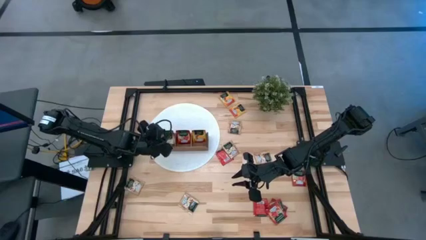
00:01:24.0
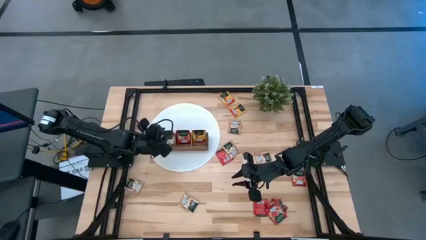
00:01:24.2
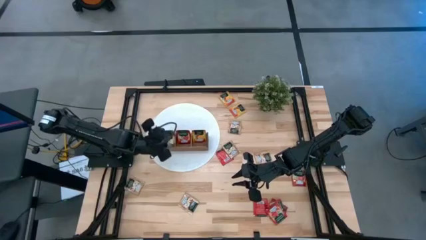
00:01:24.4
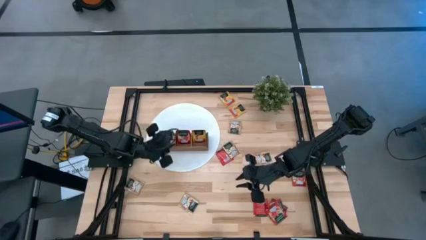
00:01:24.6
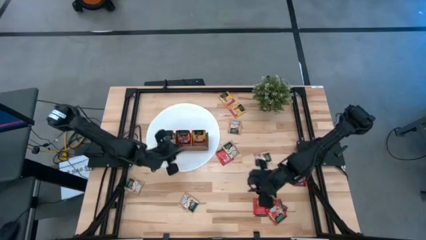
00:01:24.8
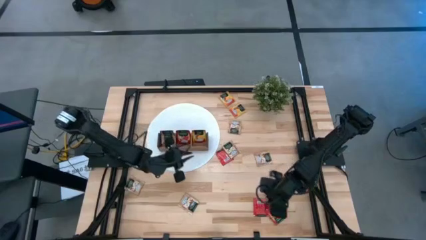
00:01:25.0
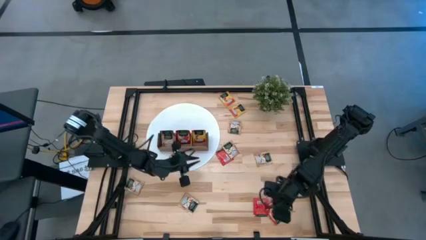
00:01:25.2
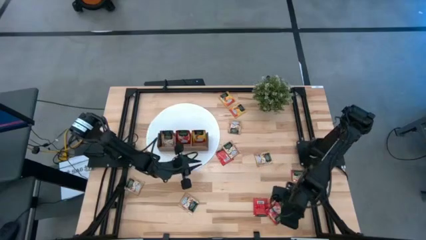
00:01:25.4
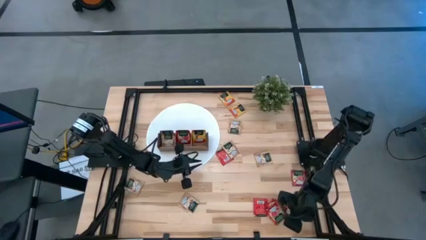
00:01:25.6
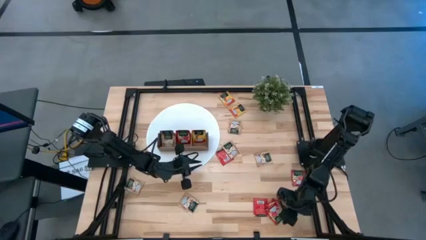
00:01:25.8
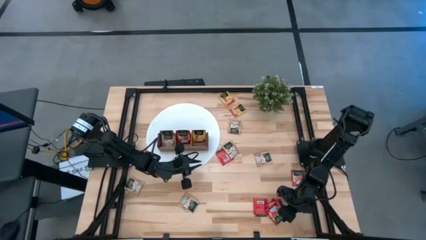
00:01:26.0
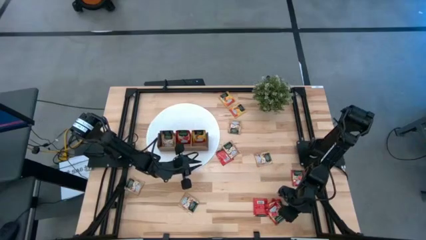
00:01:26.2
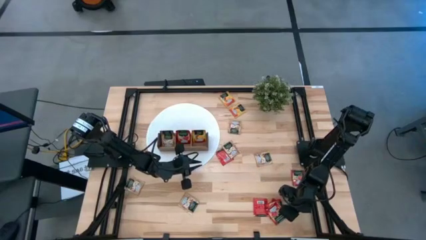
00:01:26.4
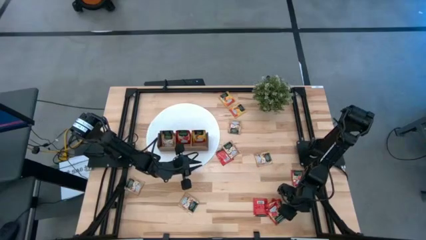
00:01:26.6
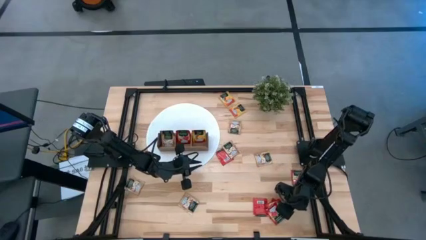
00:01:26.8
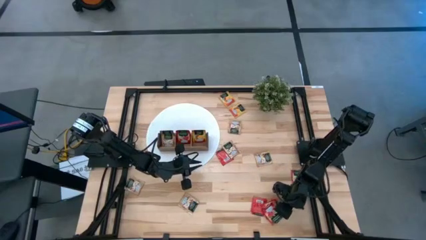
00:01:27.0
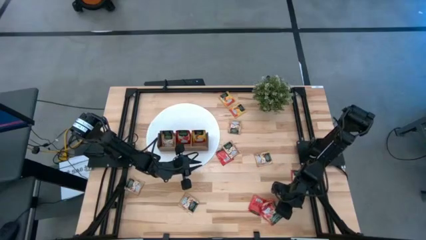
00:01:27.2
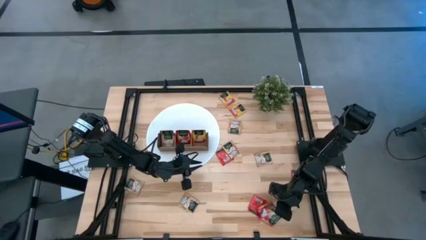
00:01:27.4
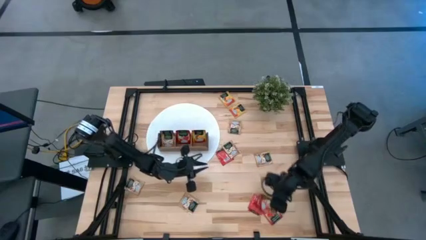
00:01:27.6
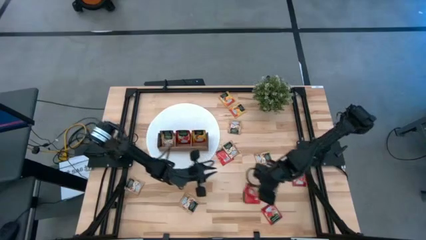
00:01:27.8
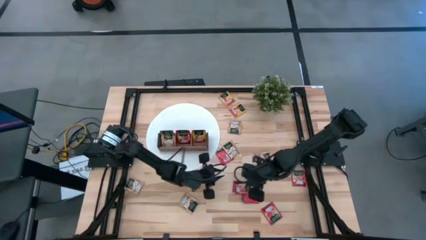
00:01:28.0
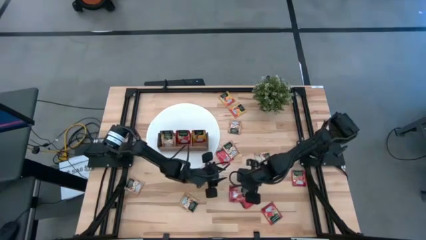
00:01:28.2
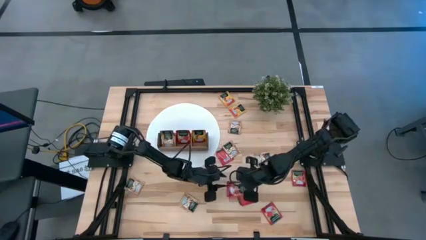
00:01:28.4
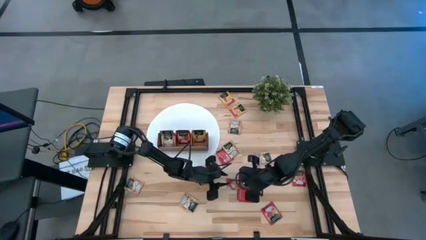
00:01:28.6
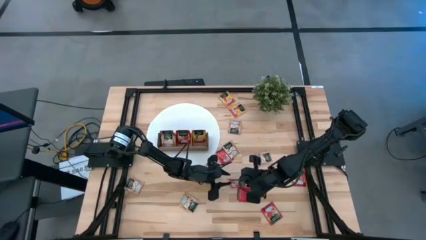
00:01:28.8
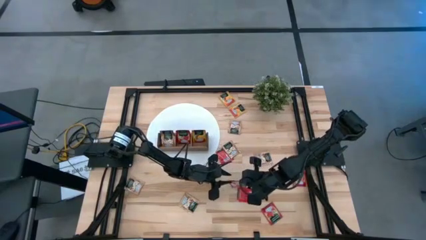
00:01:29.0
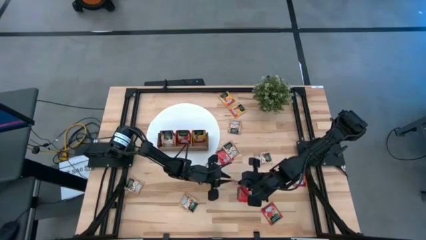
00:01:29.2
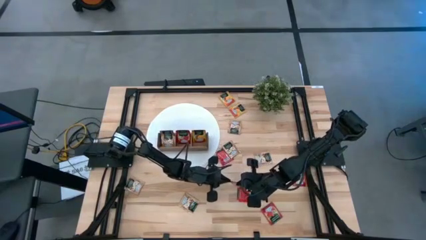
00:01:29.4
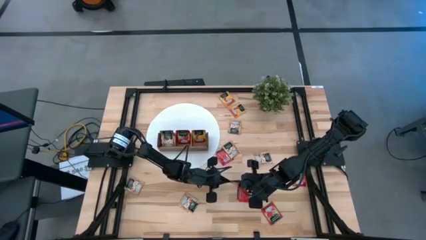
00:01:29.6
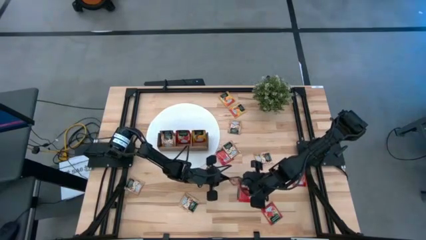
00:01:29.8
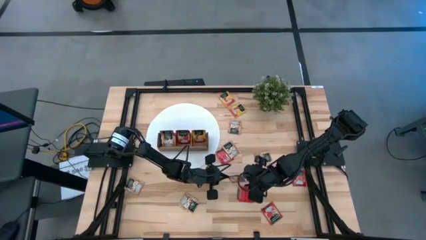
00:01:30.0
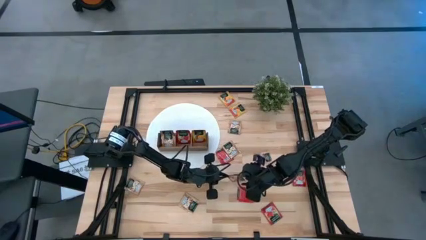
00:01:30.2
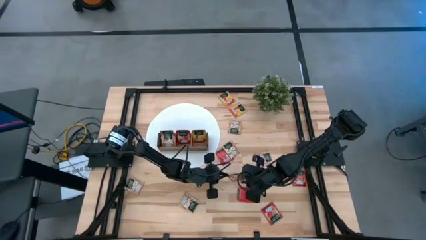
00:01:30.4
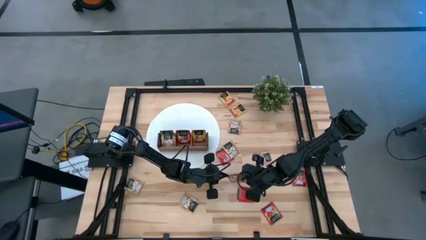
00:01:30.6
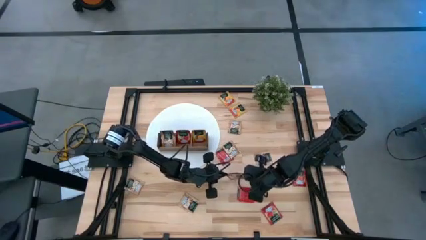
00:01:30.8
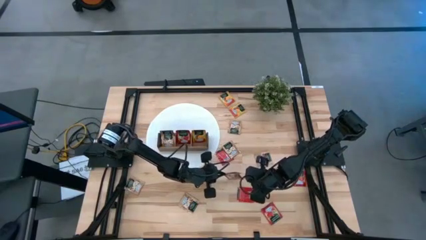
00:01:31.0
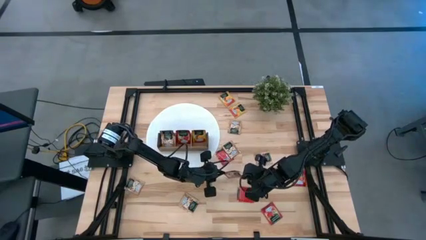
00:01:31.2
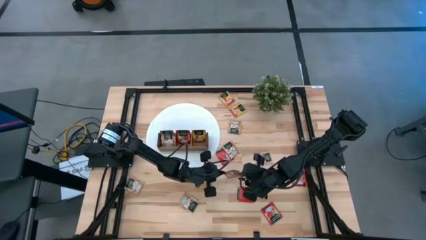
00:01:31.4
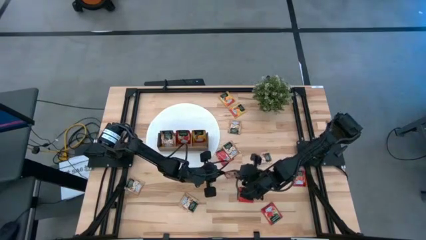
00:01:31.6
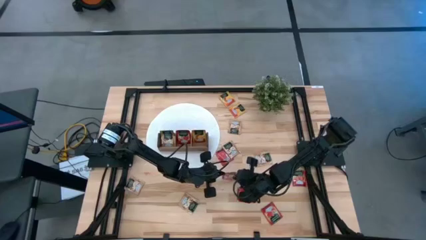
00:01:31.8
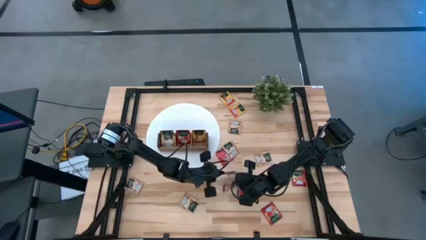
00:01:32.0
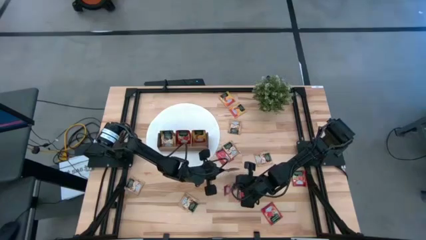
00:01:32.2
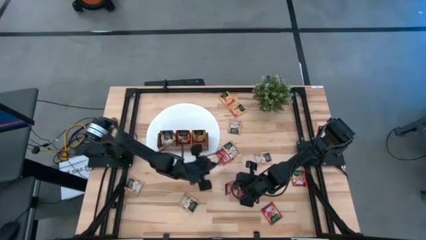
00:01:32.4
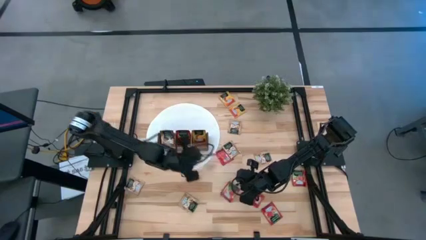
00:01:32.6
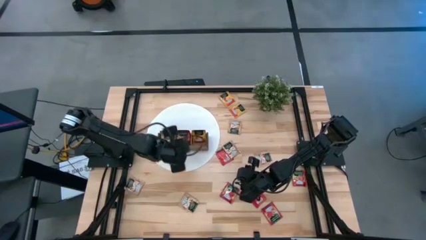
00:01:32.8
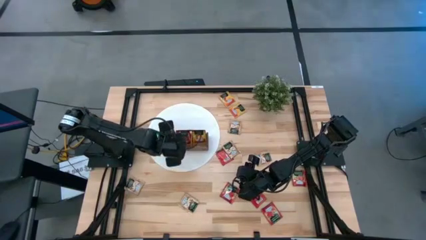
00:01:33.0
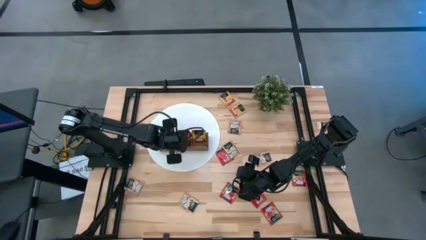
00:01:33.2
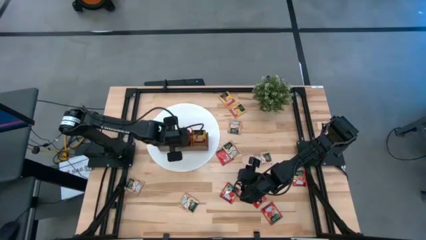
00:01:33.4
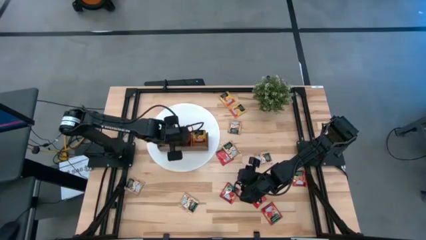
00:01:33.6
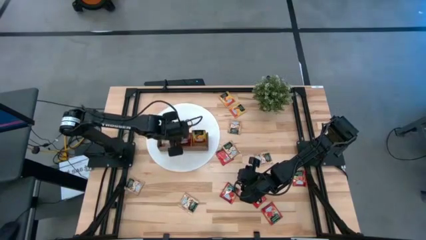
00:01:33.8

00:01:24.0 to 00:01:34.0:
Task: Pick & Place Tea
Put the red tea bag into the middle section of the wooden organizer

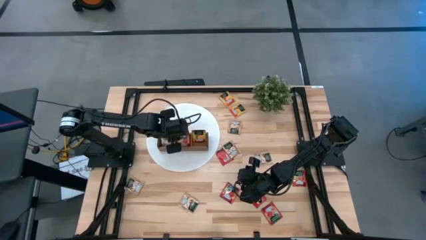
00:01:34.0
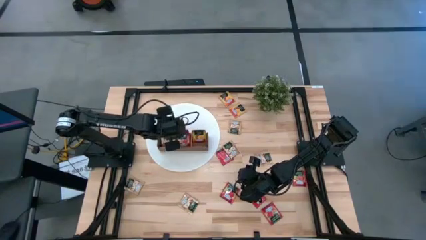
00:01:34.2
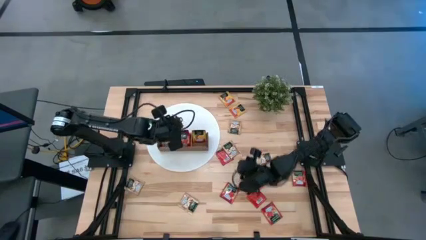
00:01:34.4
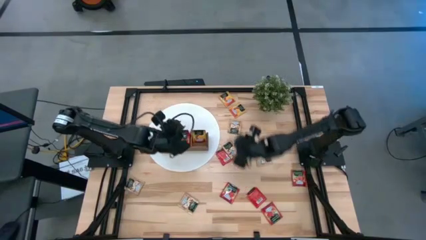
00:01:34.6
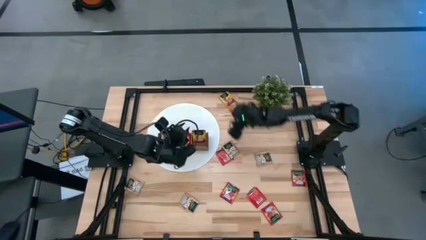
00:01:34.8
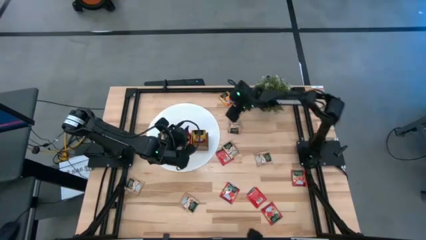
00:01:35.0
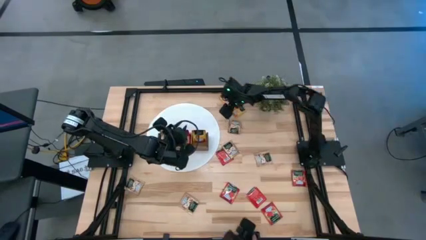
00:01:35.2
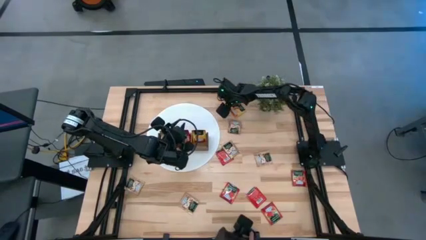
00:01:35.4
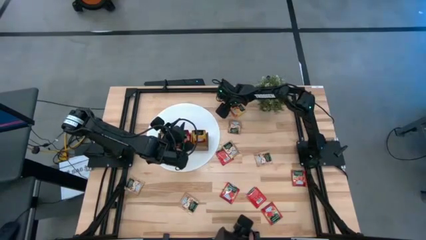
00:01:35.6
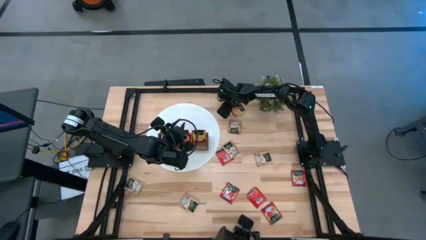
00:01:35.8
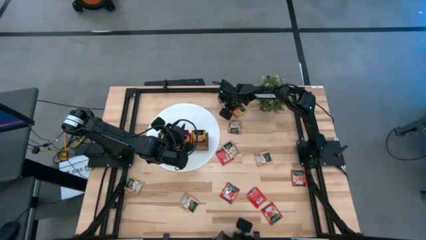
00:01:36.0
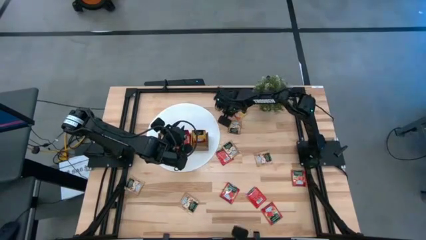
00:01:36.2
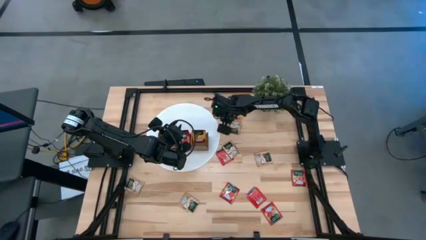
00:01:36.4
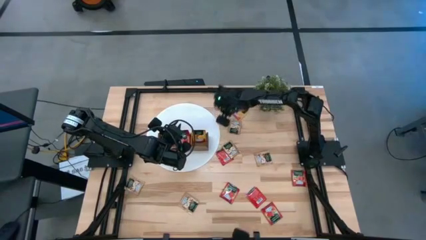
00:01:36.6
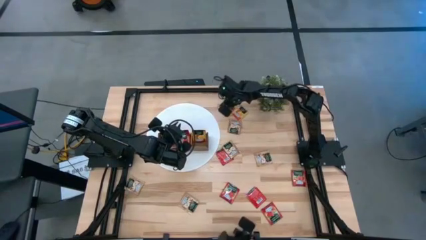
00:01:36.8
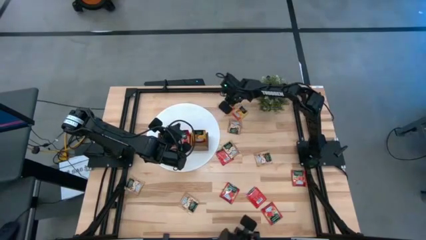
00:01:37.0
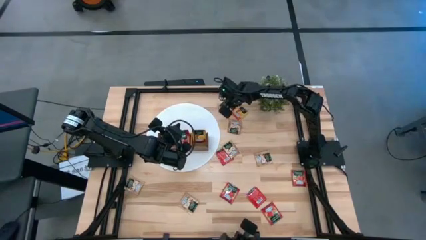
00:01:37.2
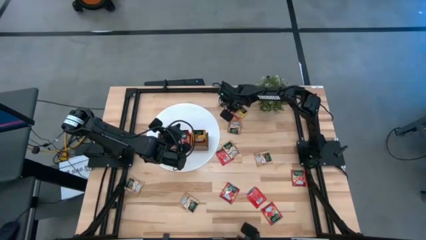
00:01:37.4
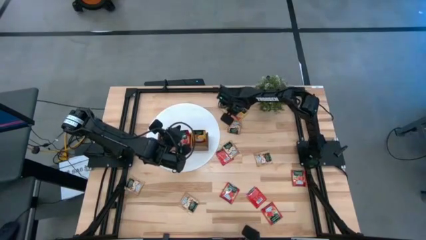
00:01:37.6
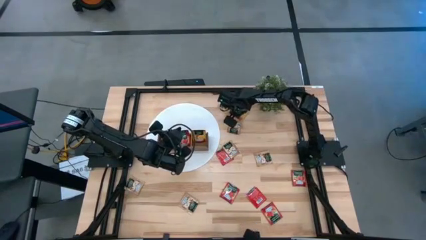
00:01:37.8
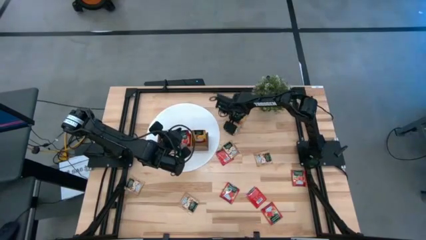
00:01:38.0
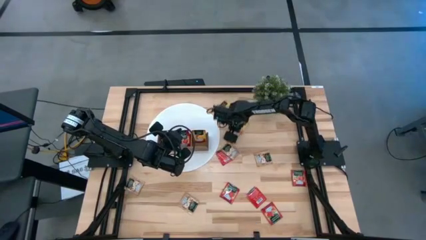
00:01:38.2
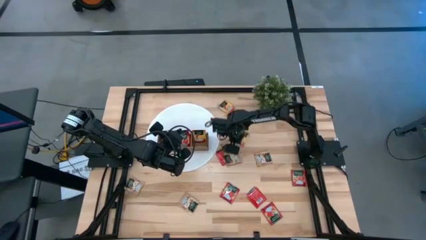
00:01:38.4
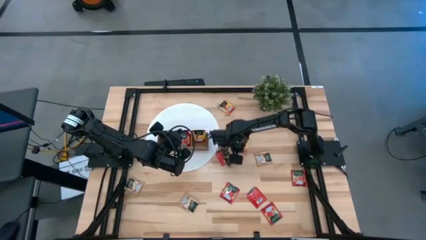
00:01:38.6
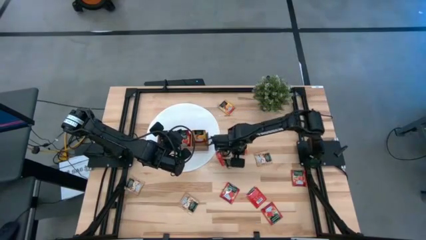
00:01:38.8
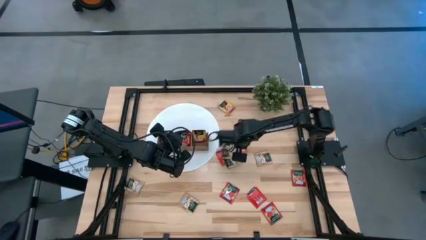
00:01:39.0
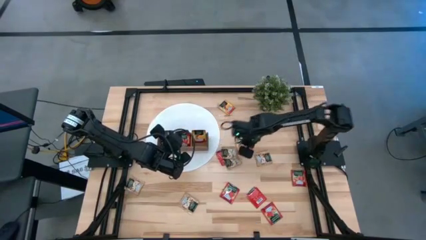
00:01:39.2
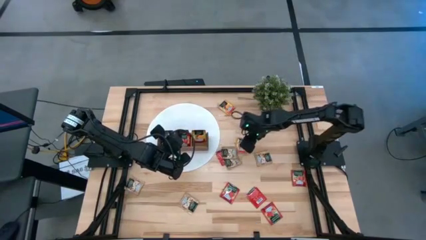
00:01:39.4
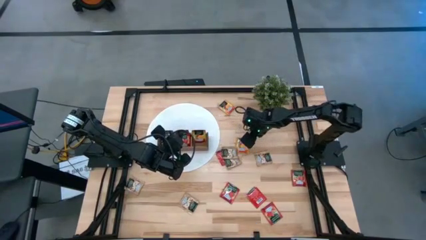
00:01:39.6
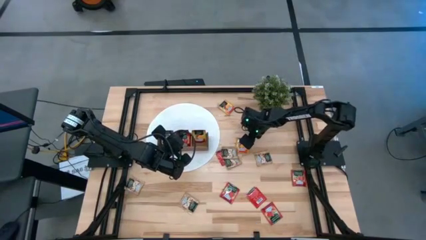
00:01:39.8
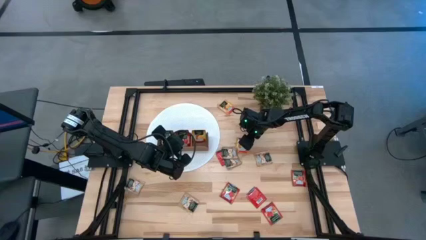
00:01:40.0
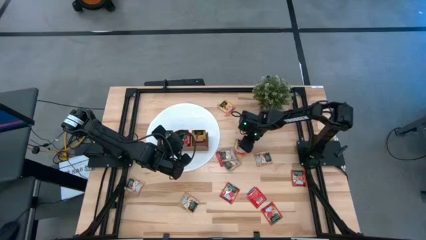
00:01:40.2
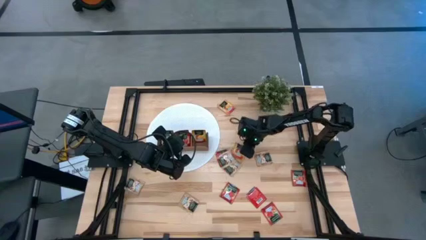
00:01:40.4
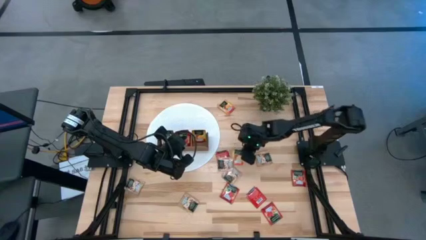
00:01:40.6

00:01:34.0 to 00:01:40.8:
Put the yellow tea bag into the right section of the wooden organizer
